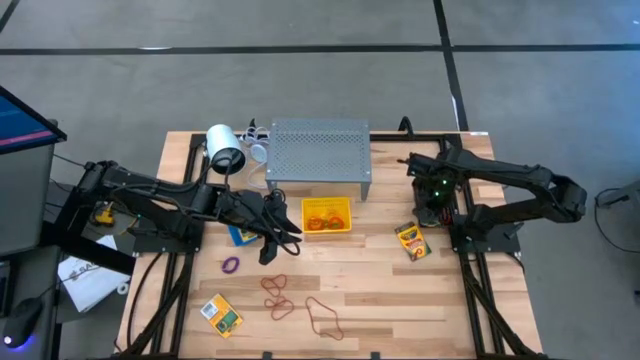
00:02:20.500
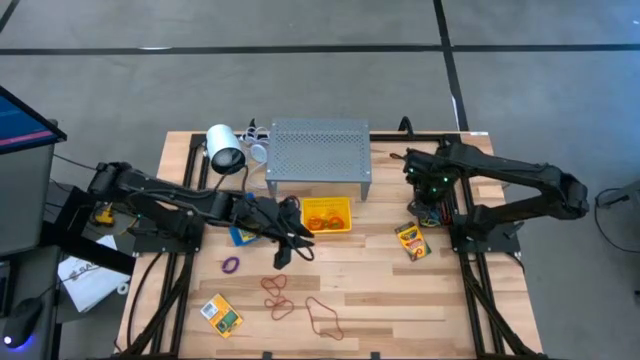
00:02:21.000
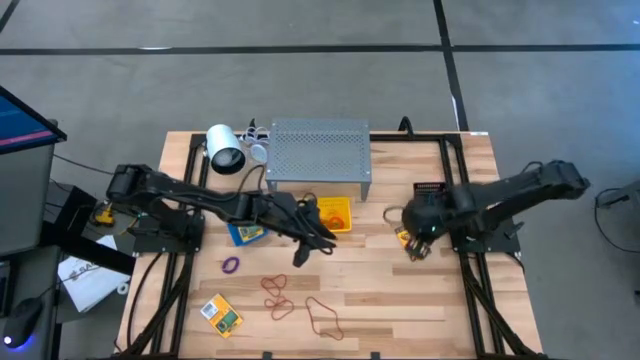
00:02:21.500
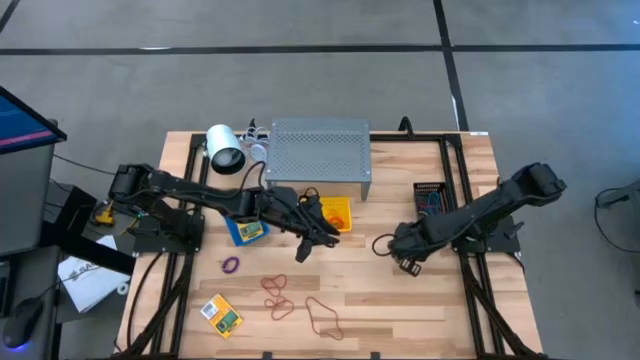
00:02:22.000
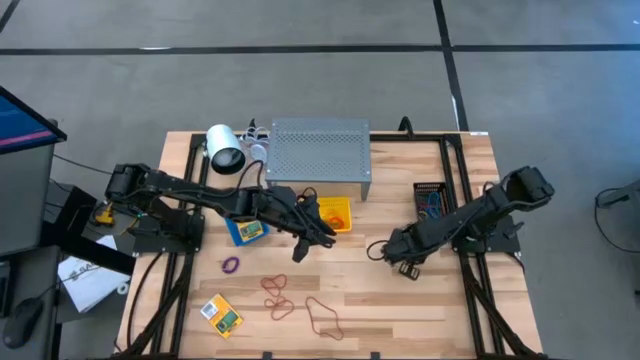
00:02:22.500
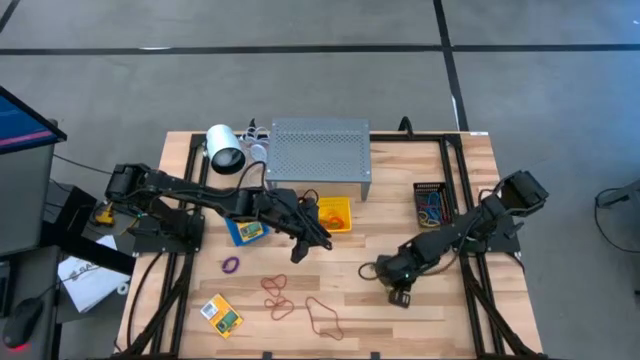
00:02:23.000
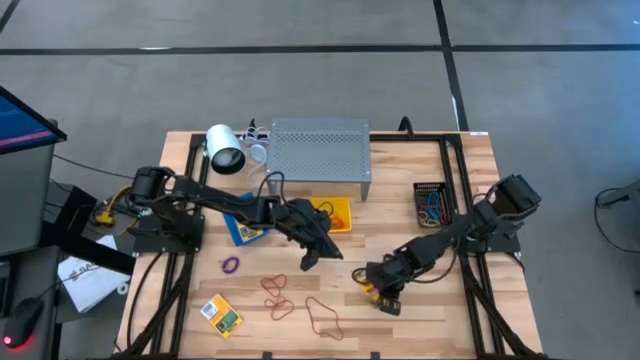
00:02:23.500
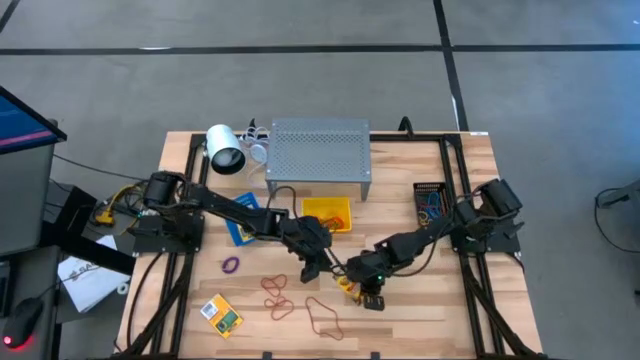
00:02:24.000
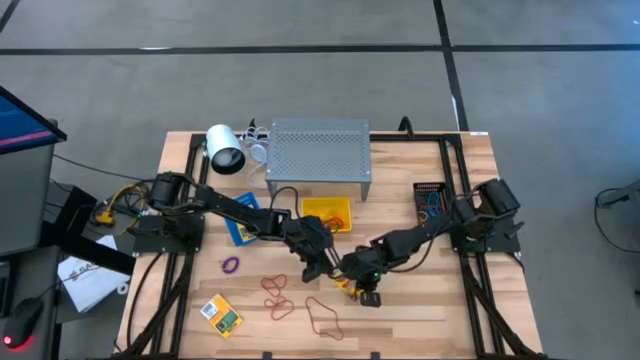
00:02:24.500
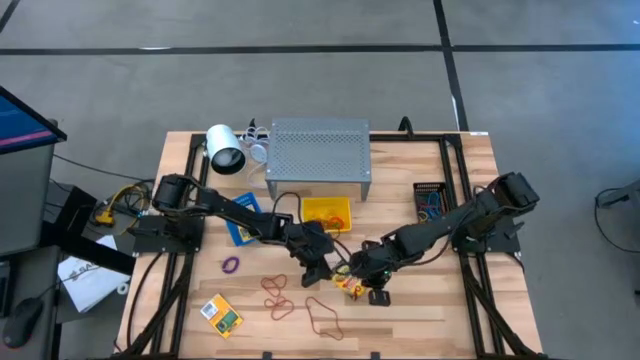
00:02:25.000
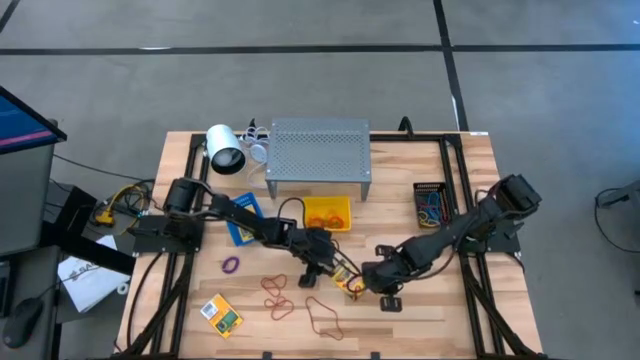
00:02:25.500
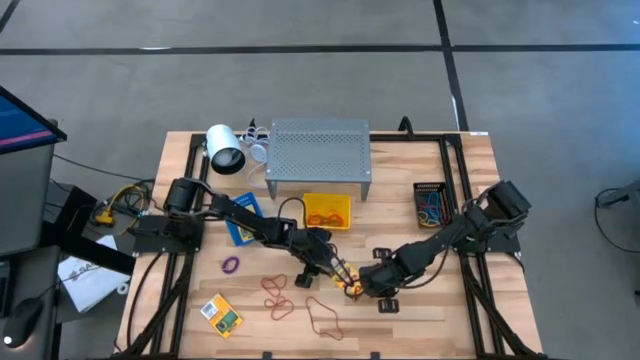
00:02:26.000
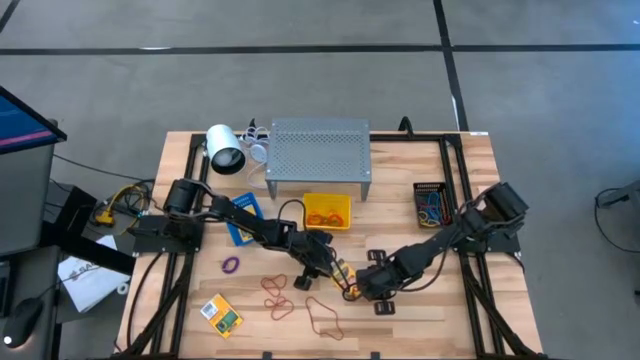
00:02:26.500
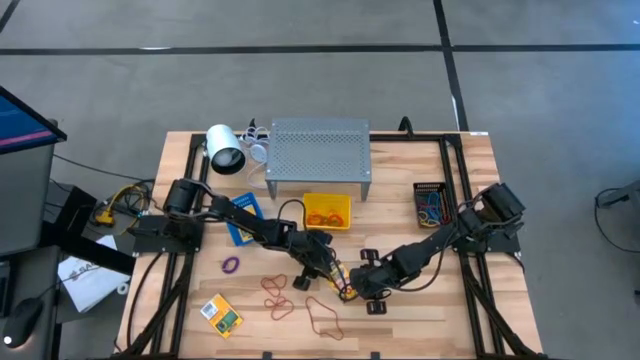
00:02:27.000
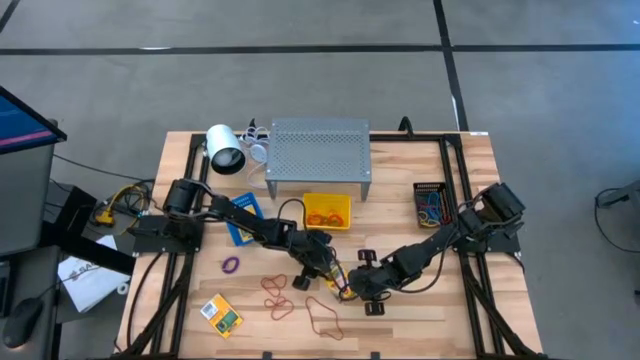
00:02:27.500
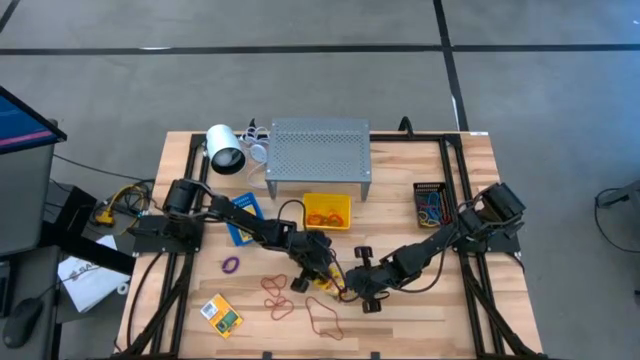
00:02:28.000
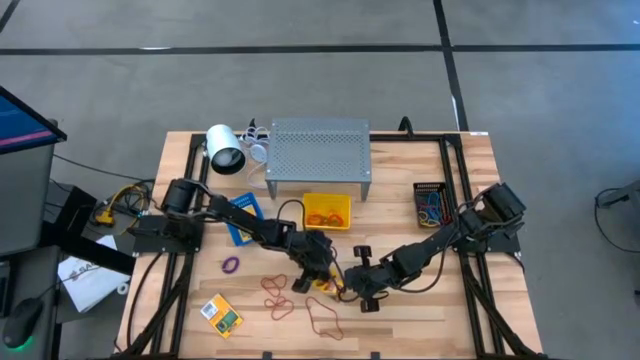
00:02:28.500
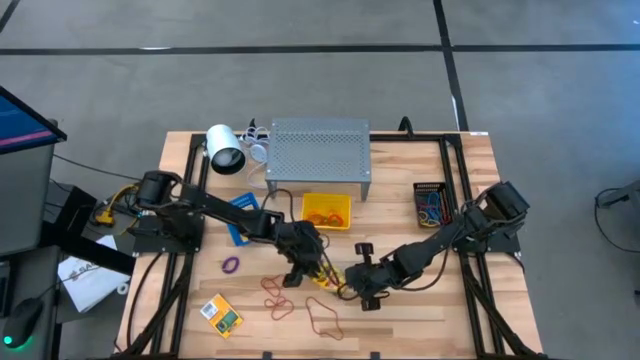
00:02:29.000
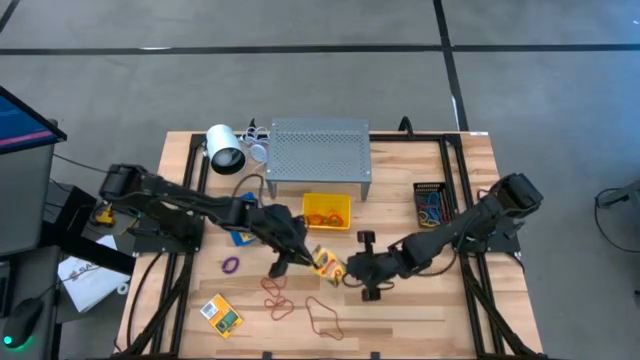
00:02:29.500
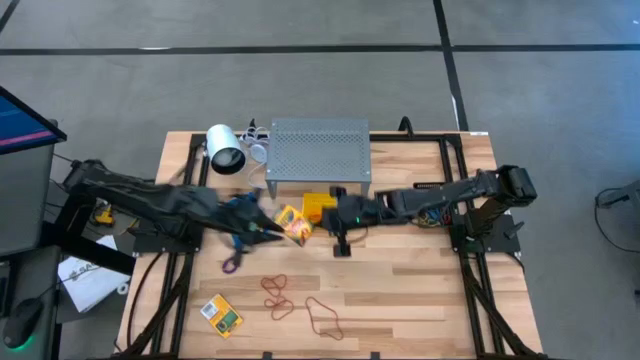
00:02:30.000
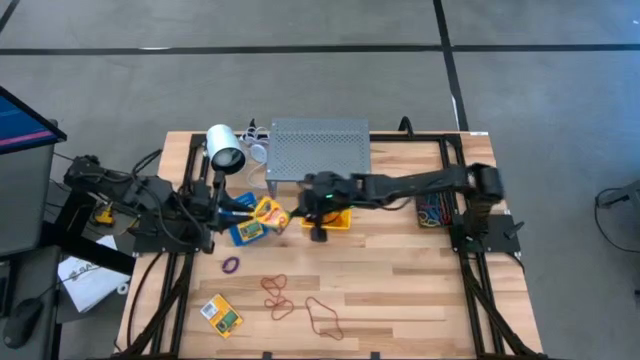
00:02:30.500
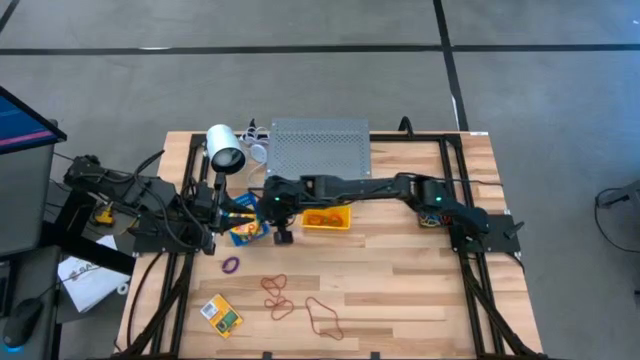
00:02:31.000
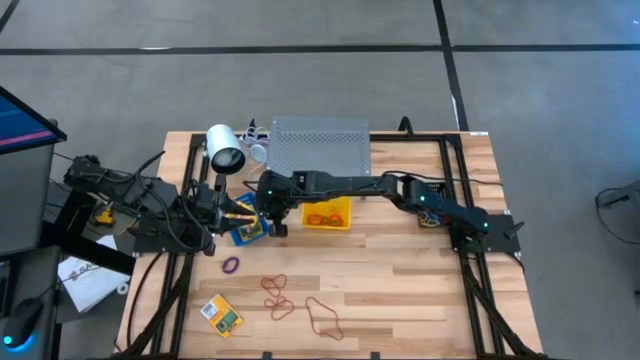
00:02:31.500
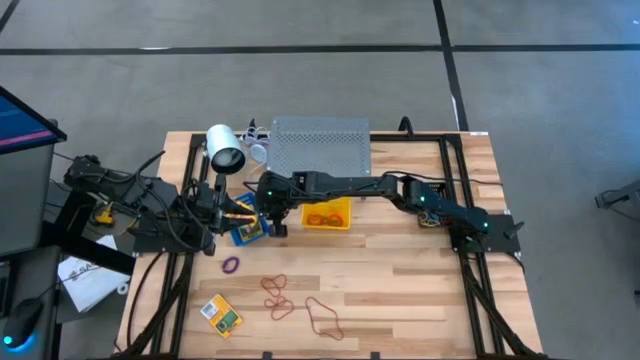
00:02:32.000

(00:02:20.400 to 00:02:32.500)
Task: Pick & Place Office Desk Supplies
Put the crayon box into the blue bin

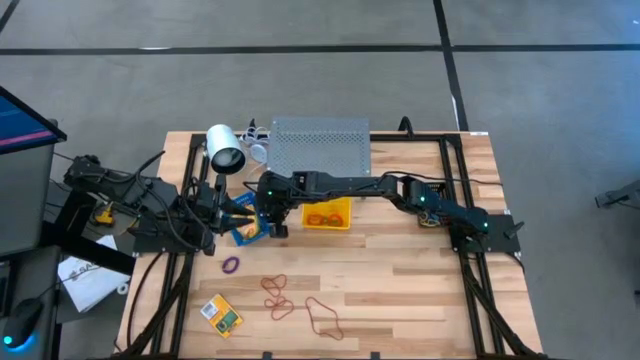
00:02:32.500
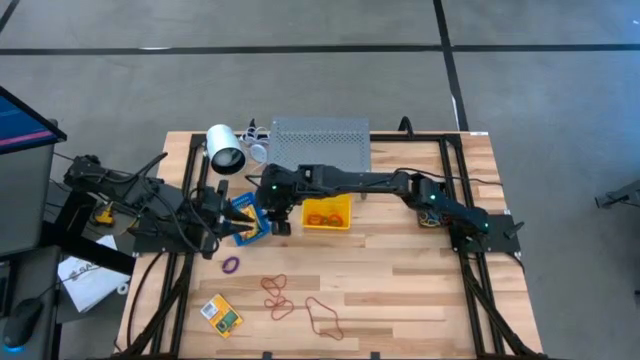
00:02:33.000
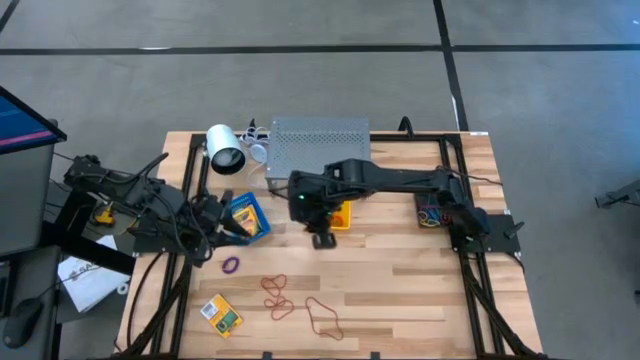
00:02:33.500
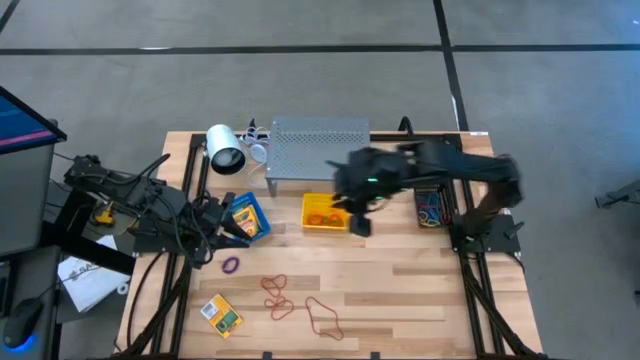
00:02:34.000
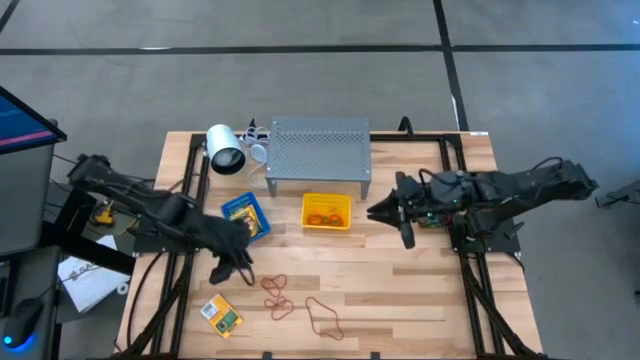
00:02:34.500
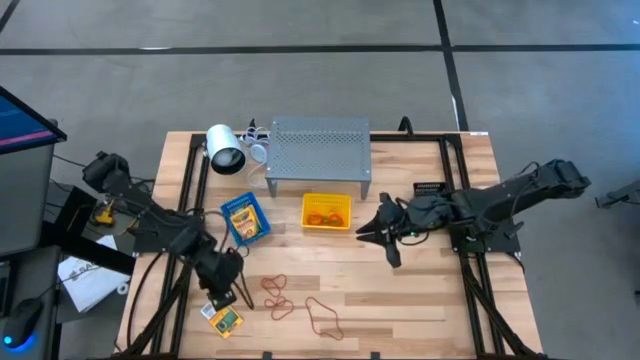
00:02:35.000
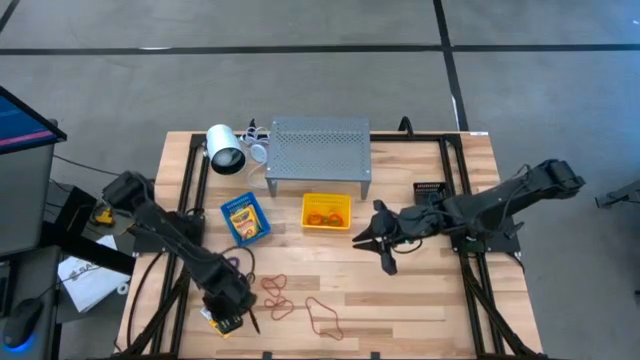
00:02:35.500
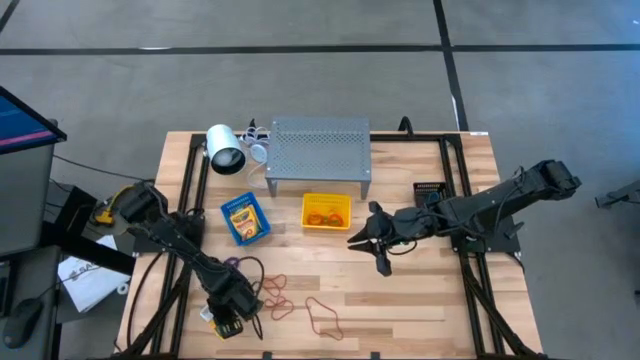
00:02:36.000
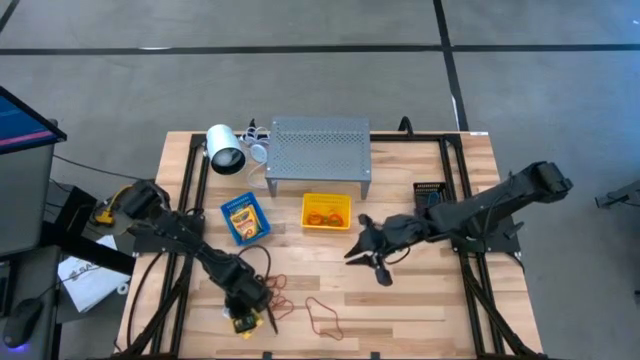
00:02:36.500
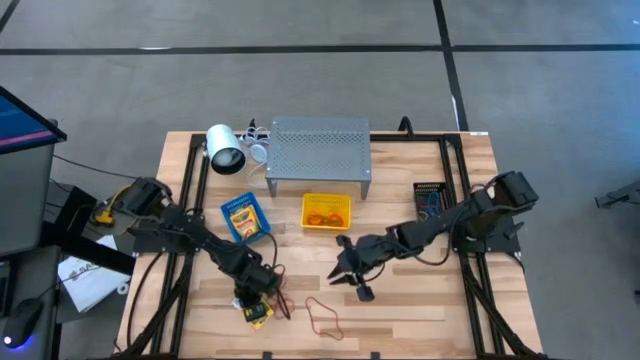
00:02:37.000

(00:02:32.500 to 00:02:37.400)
Move the crayon box to the center of the table

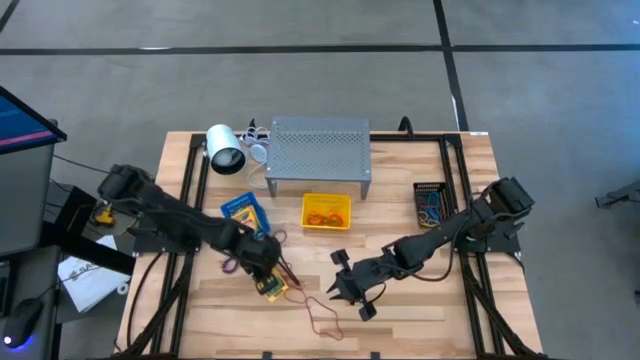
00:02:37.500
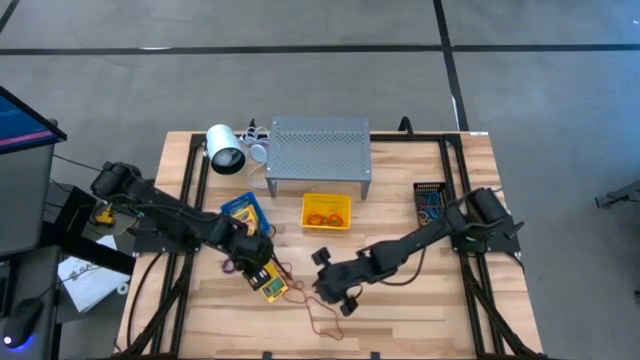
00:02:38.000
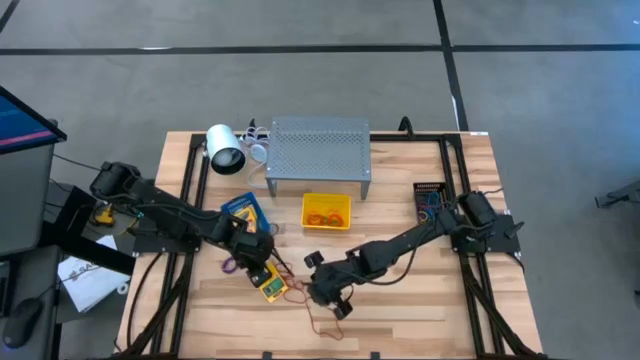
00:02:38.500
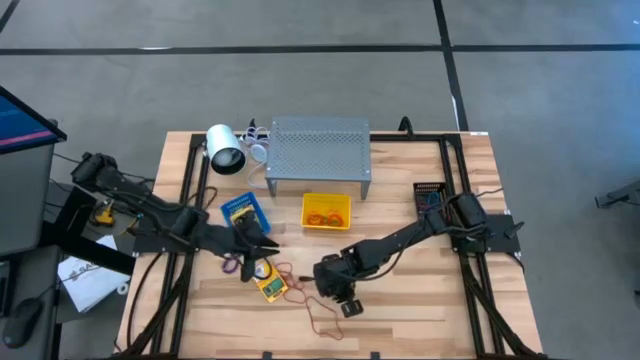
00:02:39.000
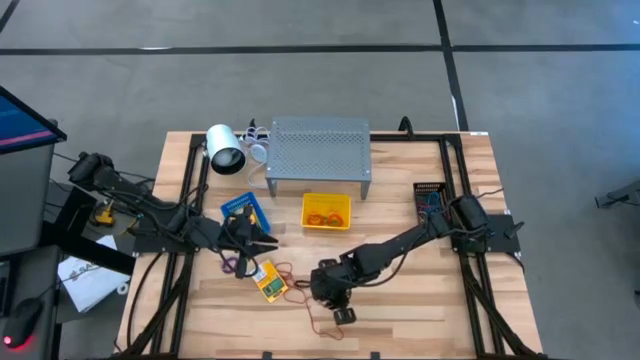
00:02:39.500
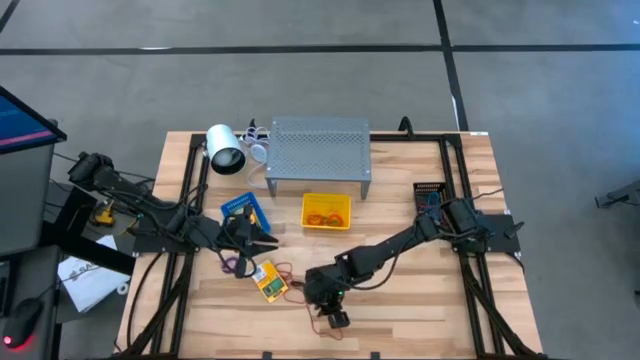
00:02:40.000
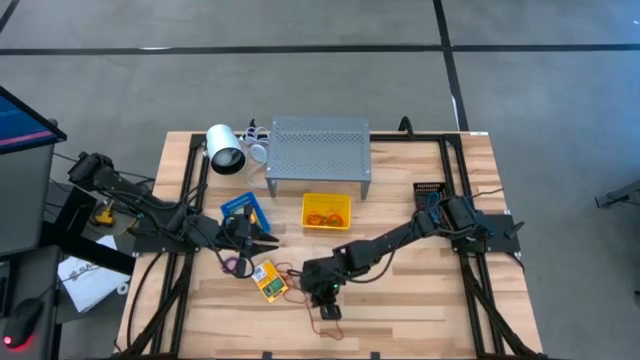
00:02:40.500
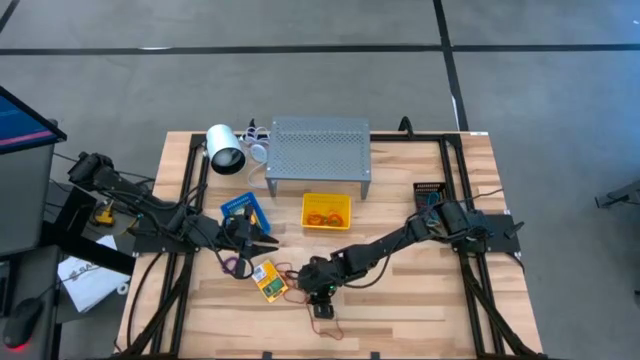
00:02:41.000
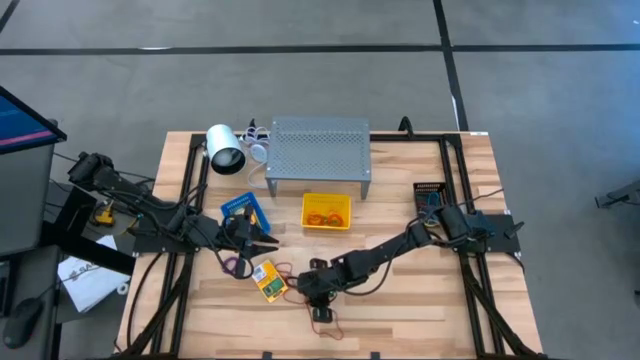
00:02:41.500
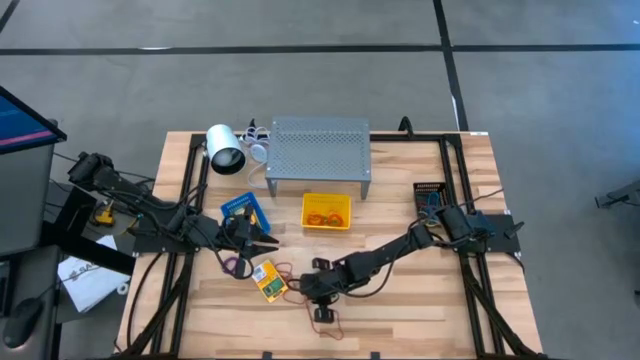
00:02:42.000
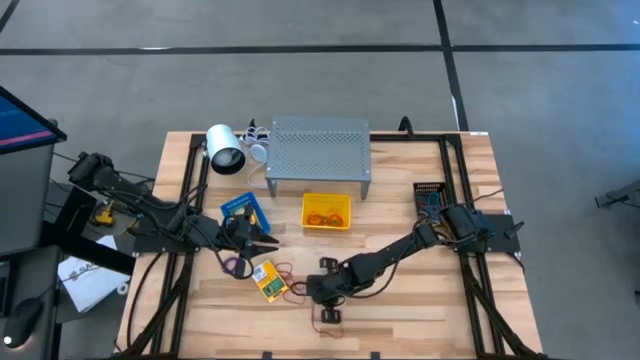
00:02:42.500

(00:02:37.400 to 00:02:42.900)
Put the red rubber band into the black bin
